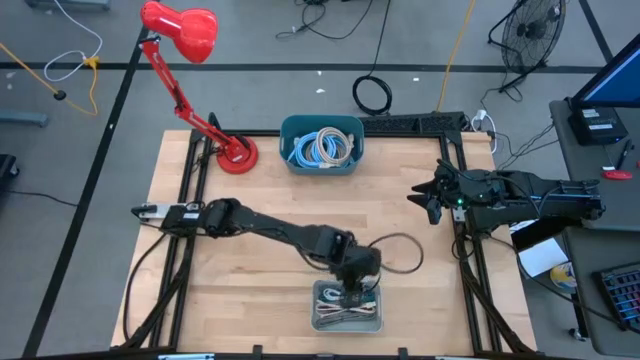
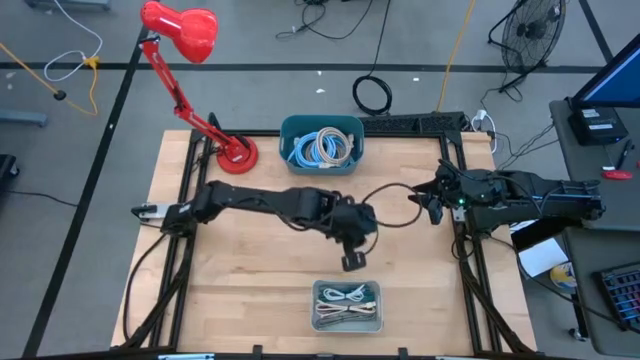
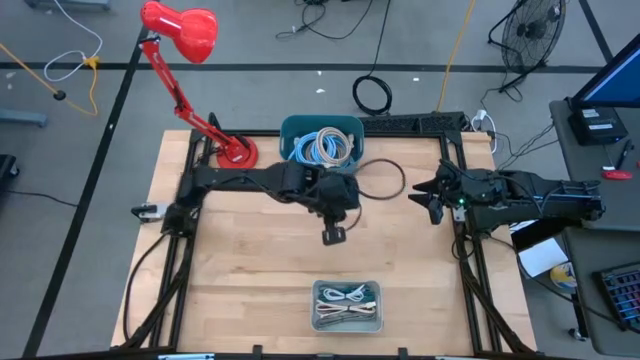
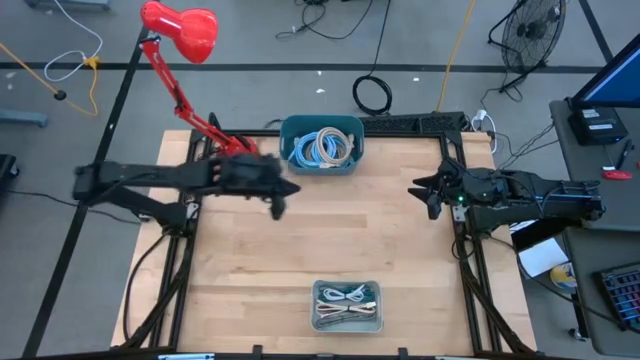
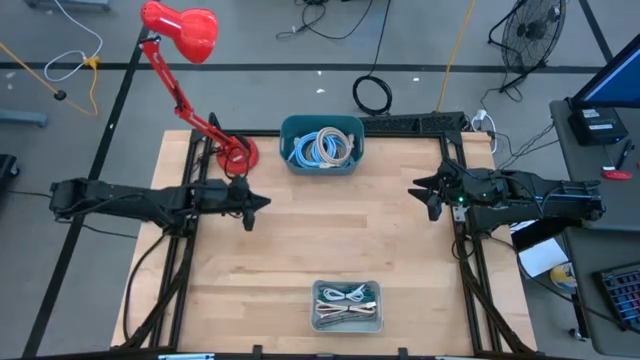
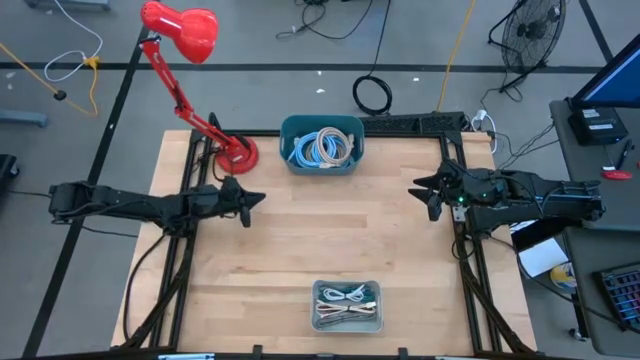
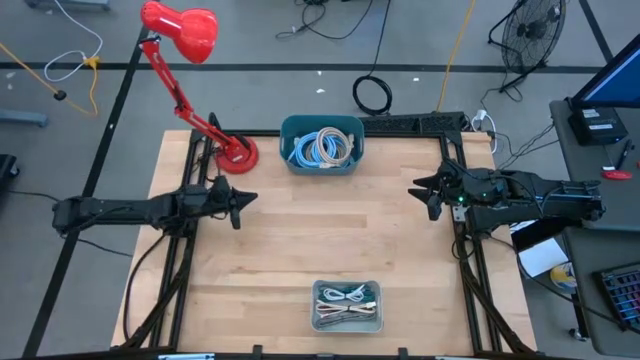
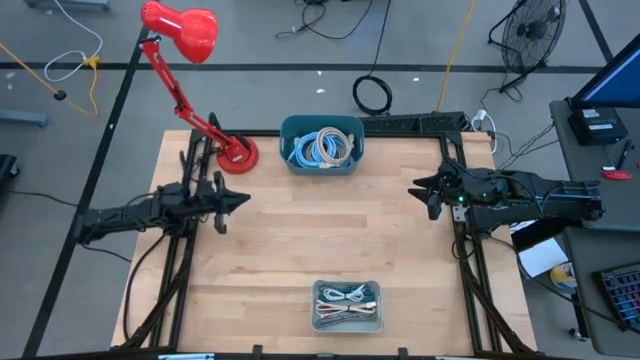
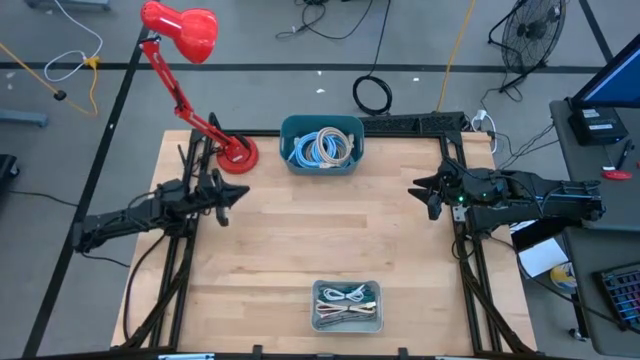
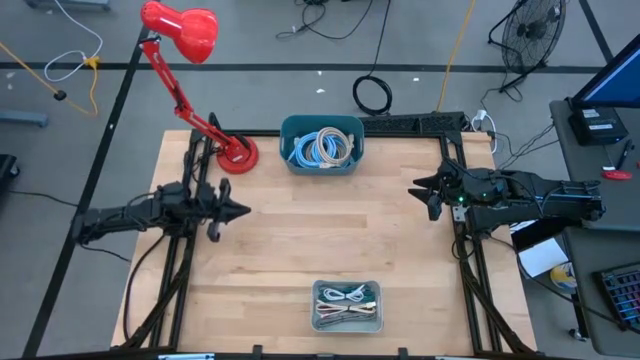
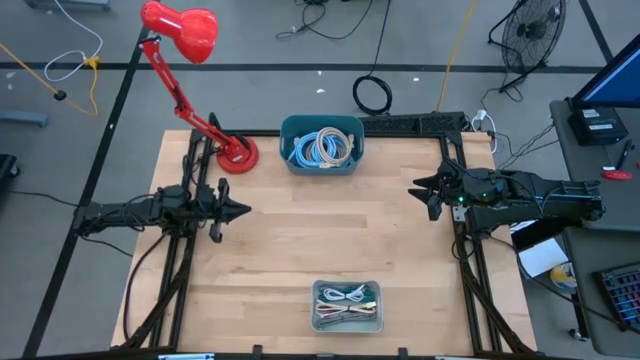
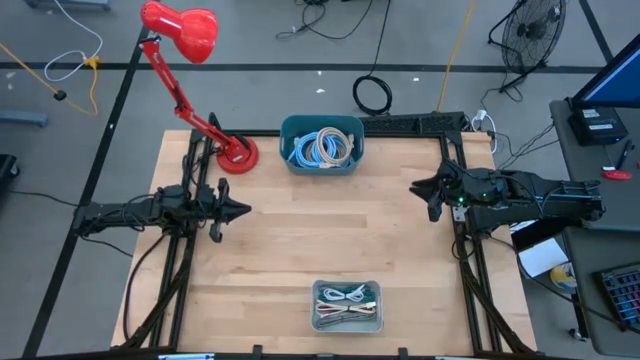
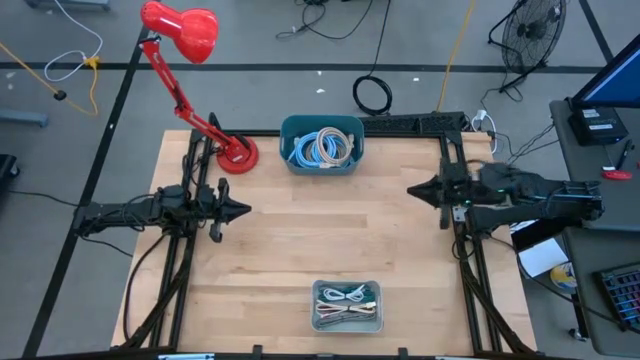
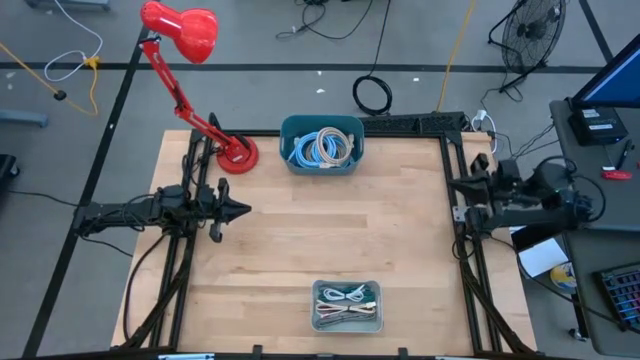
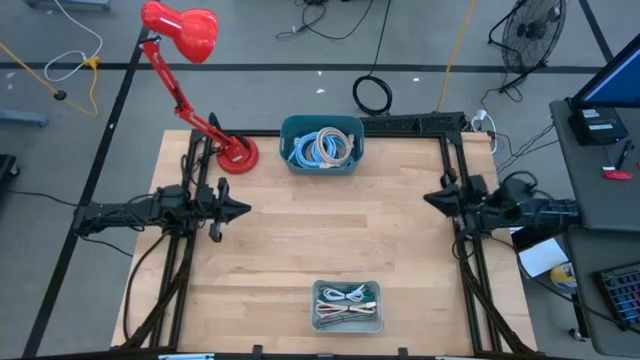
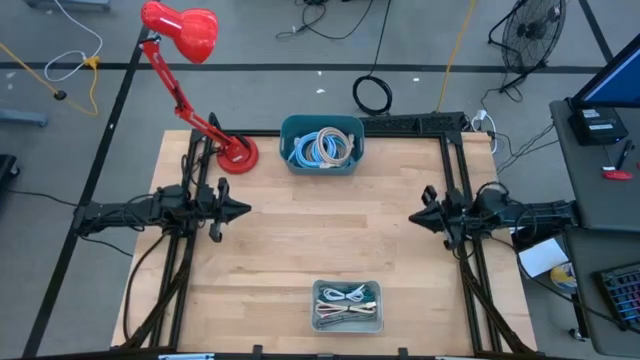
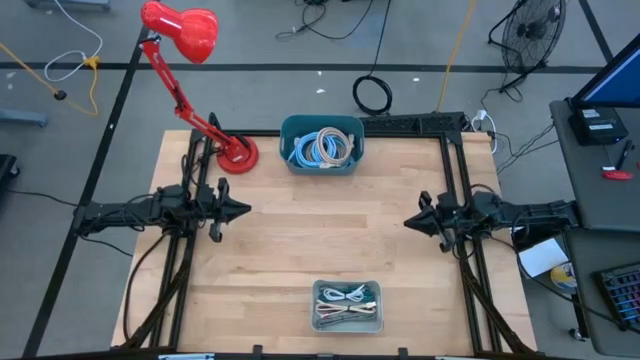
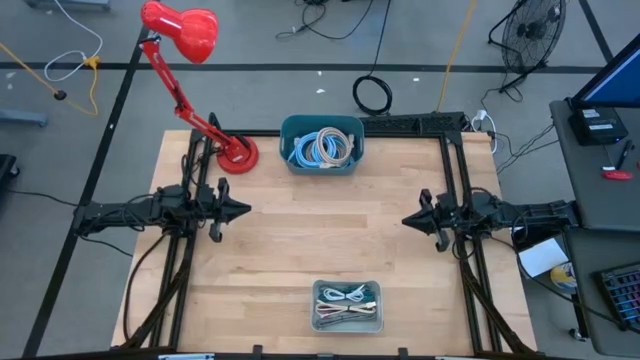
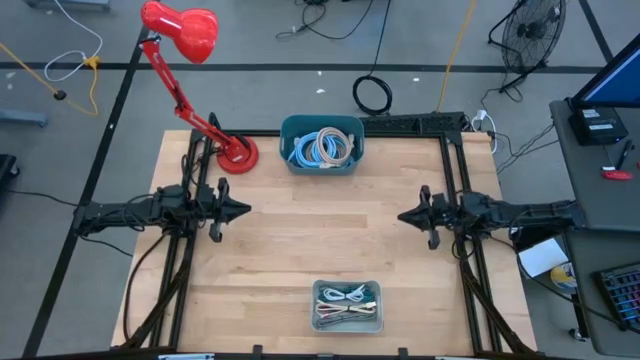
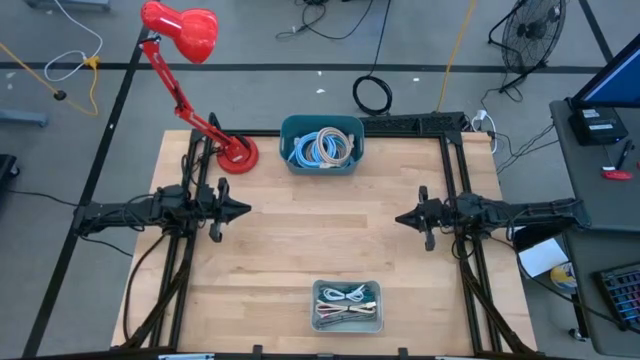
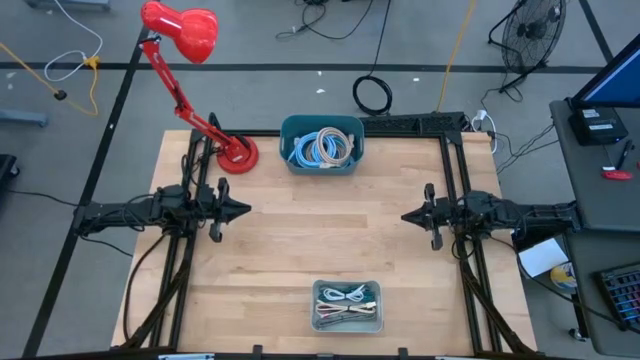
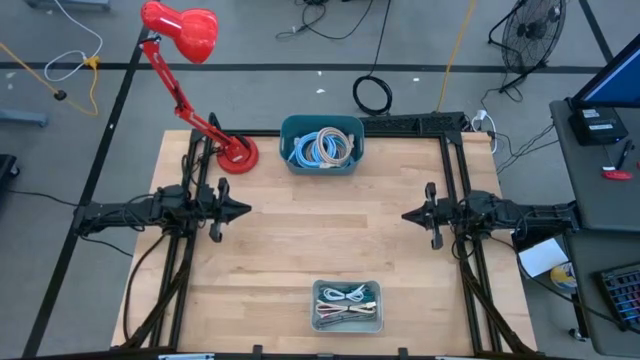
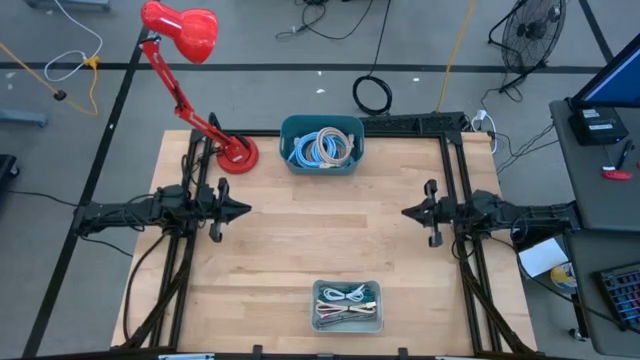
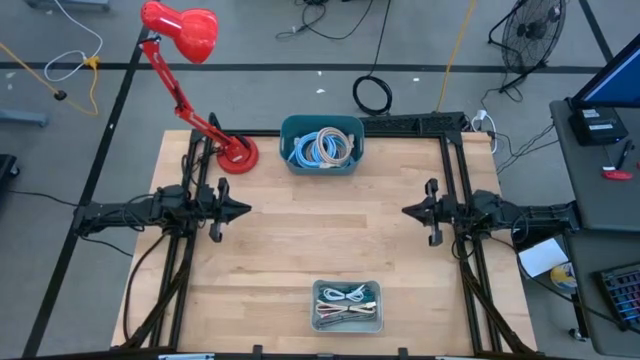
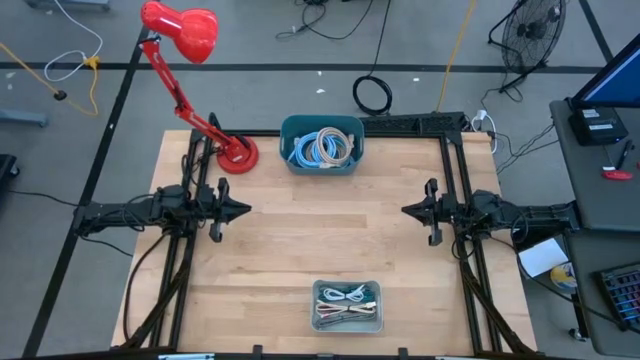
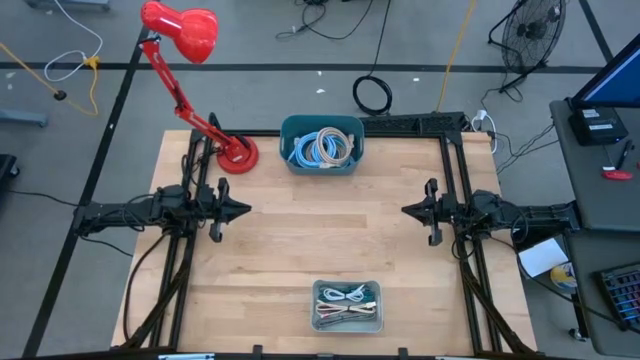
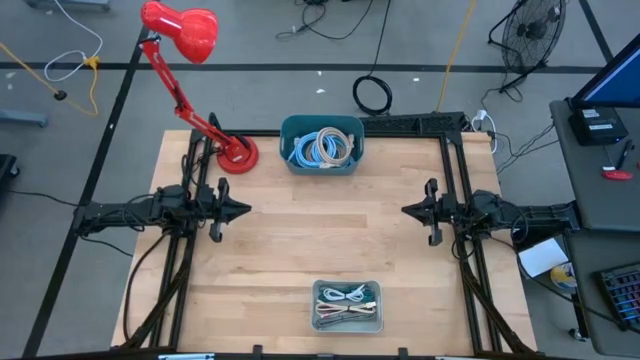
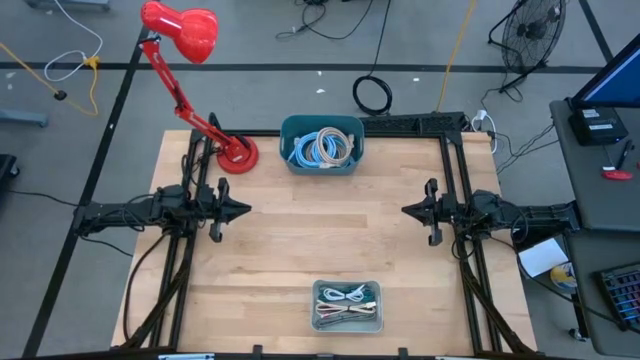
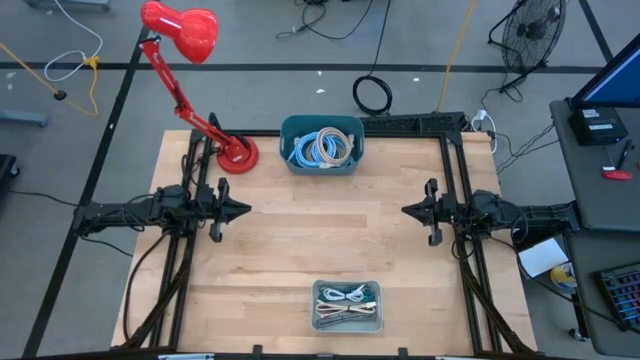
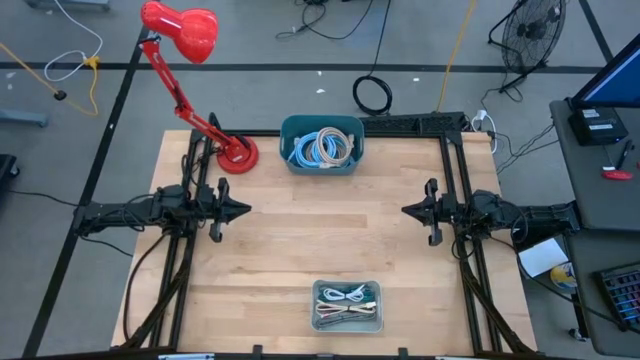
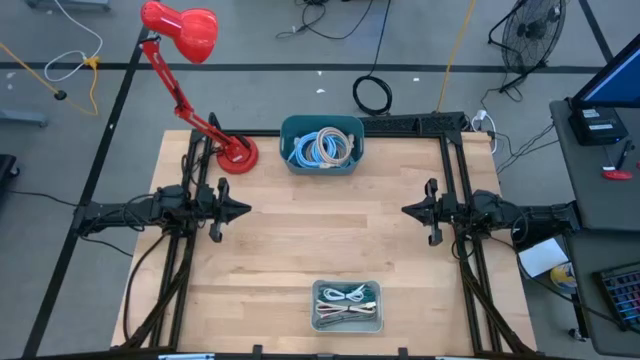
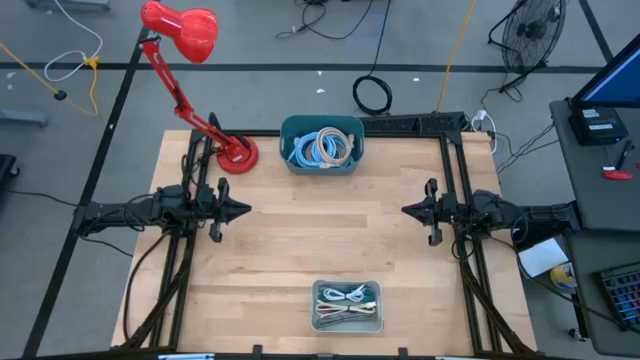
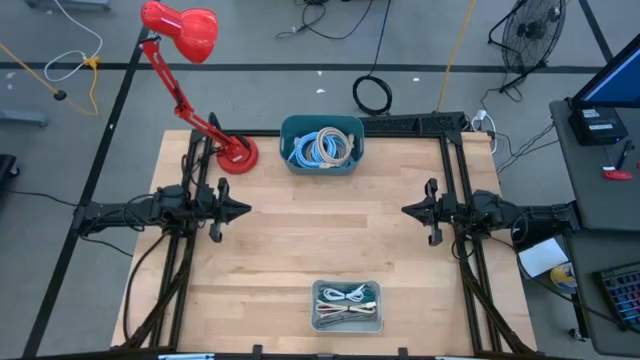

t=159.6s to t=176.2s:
Task: Pick & Place USB Port
Return to Home Position

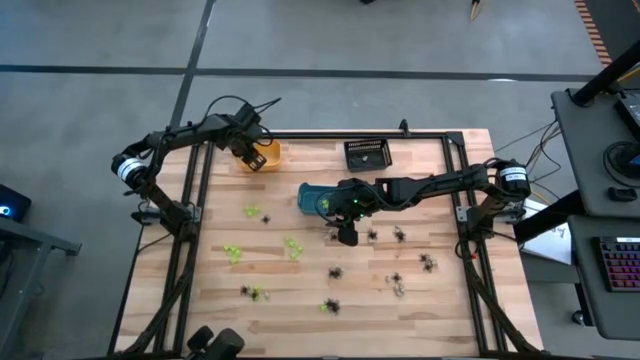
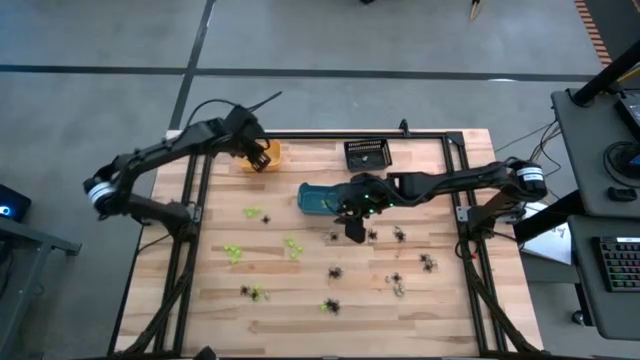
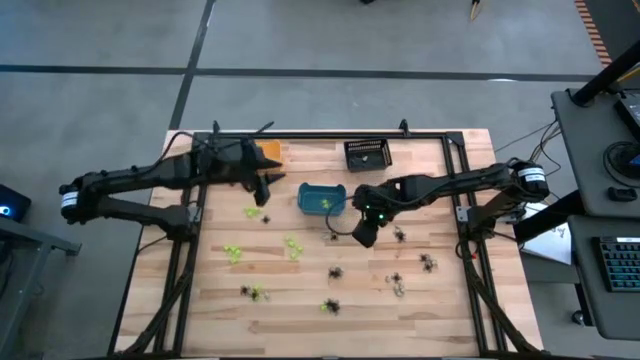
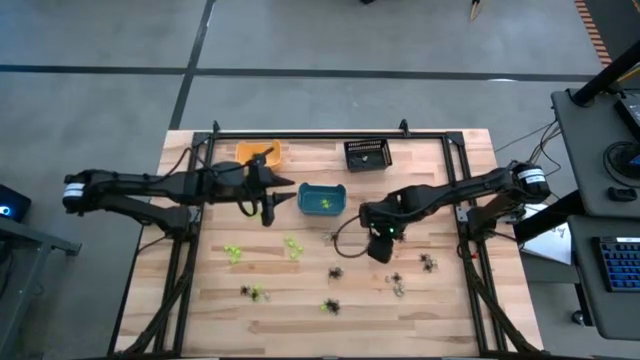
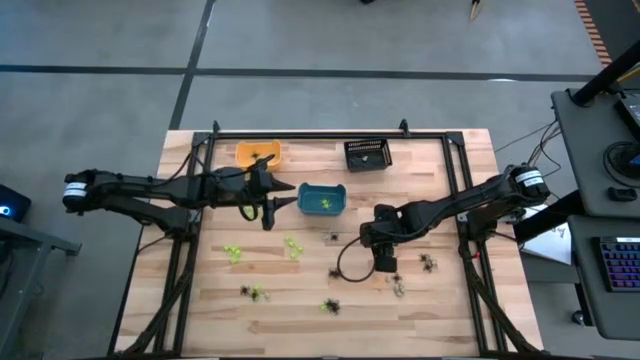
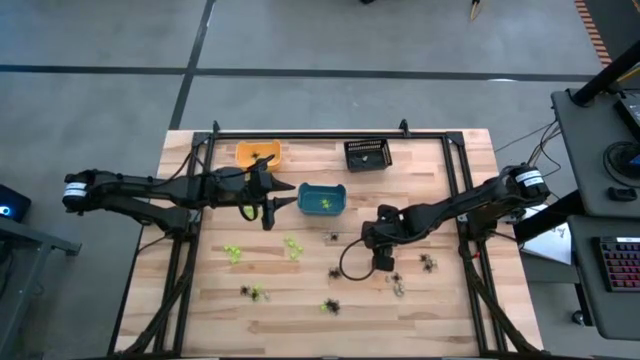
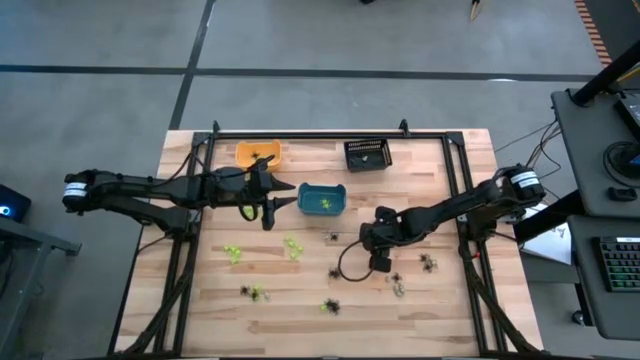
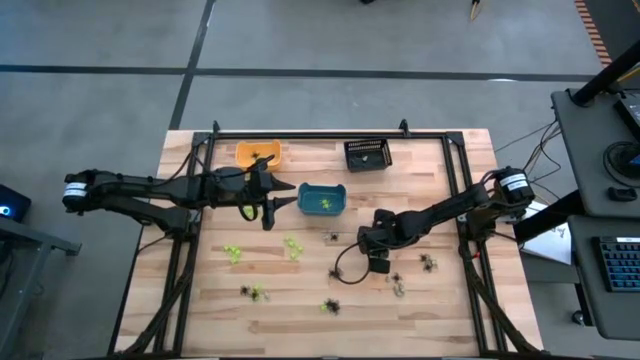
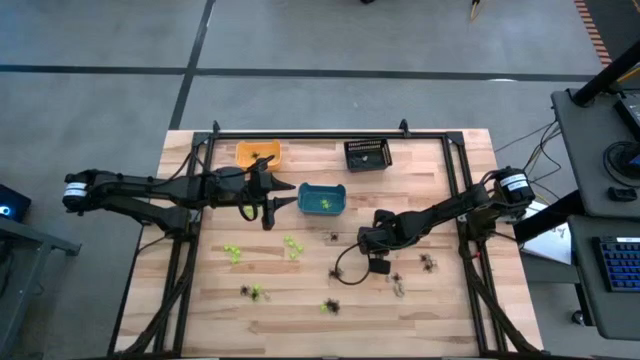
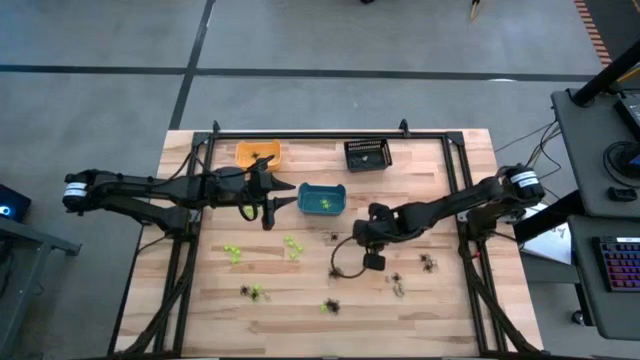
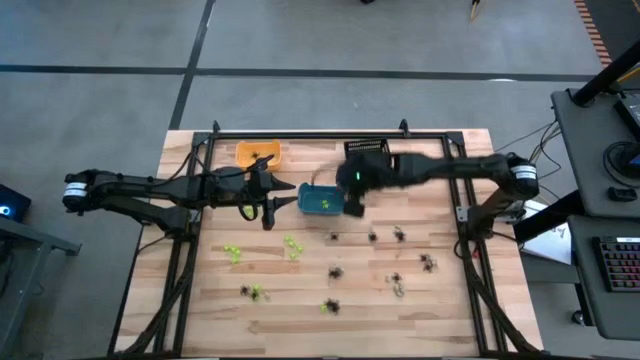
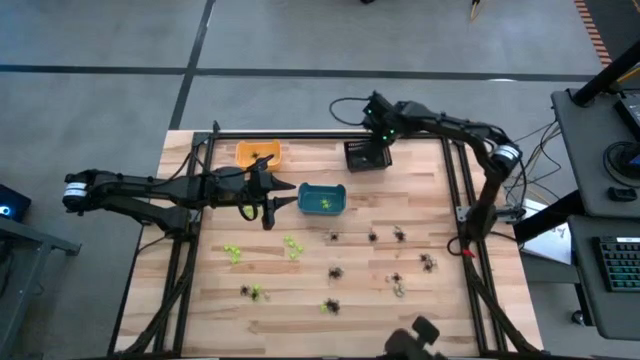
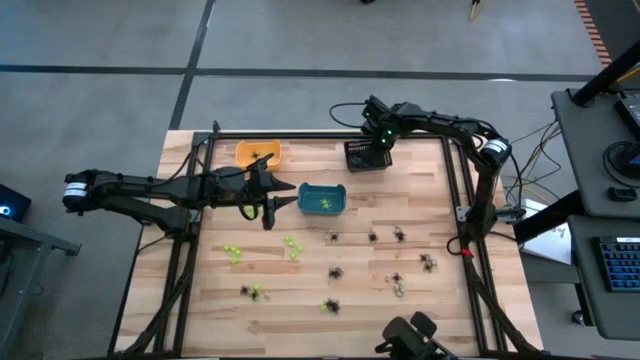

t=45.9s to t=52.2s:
Task: Sort Halloween decoration
Put the white skull toy into the black bin
